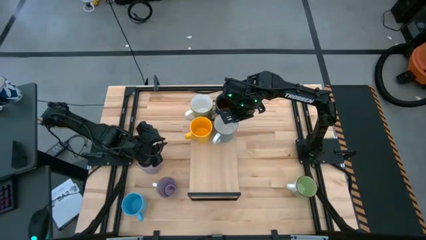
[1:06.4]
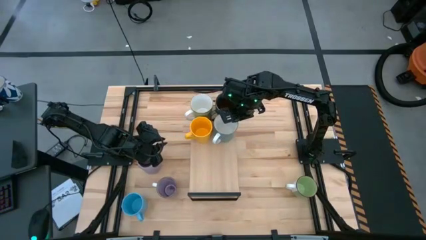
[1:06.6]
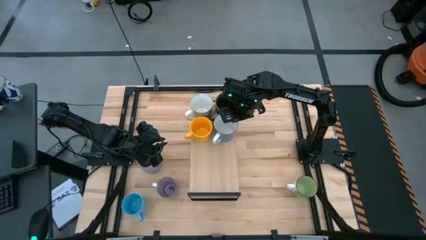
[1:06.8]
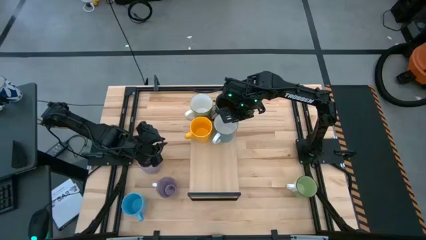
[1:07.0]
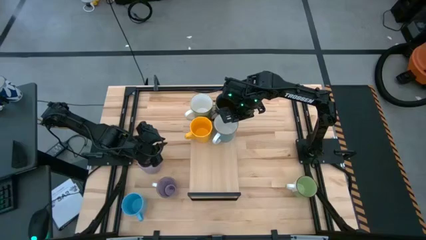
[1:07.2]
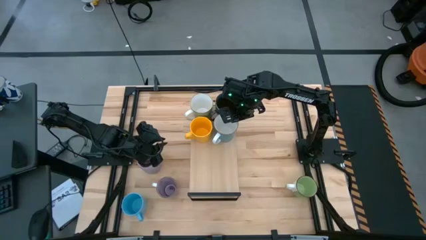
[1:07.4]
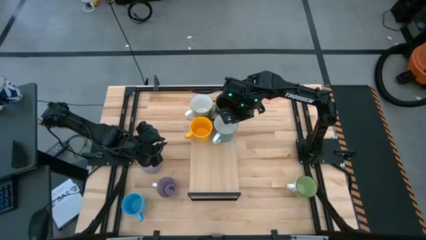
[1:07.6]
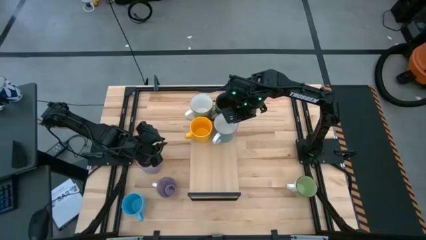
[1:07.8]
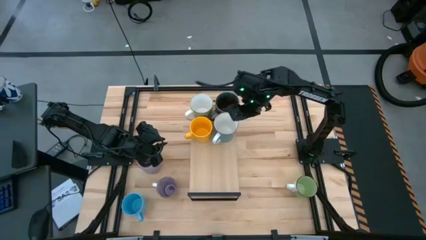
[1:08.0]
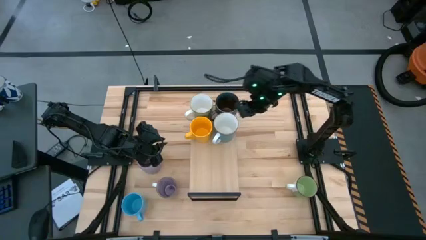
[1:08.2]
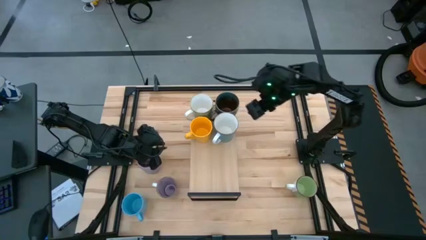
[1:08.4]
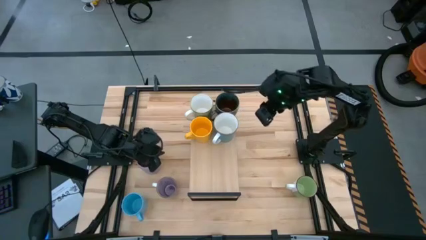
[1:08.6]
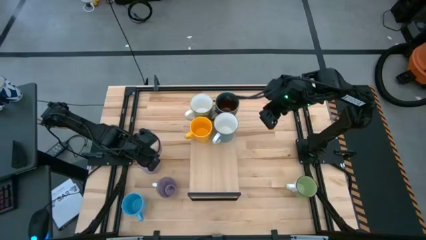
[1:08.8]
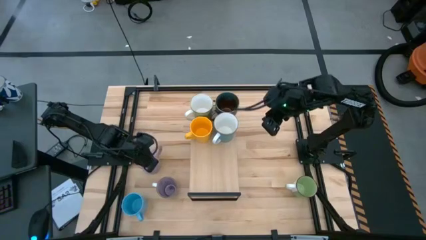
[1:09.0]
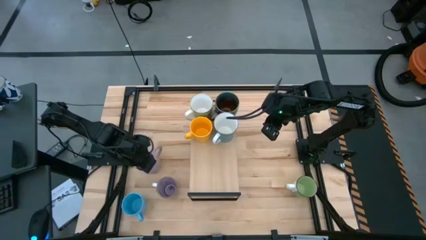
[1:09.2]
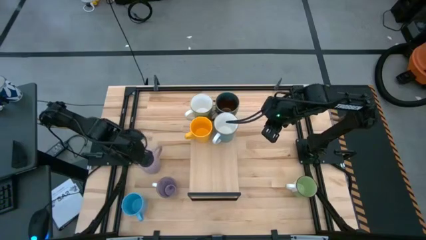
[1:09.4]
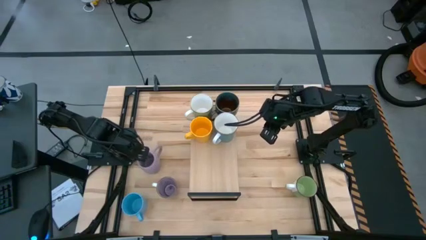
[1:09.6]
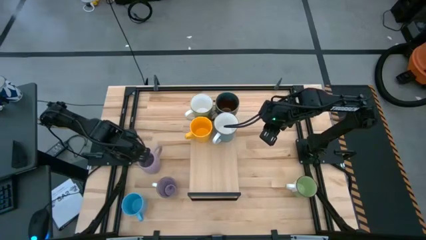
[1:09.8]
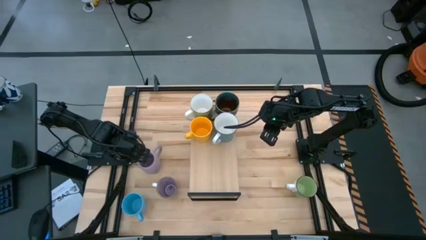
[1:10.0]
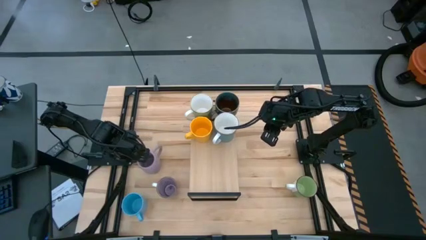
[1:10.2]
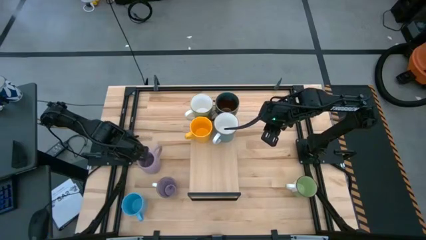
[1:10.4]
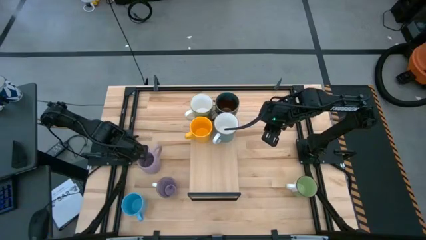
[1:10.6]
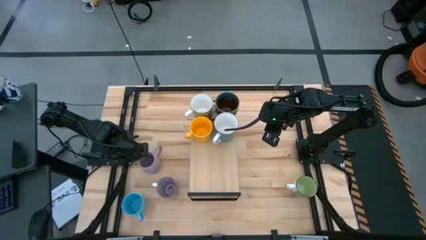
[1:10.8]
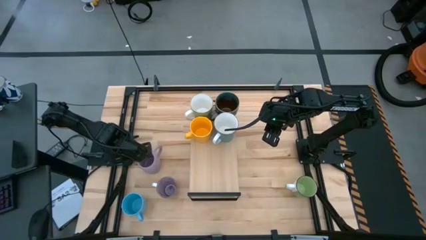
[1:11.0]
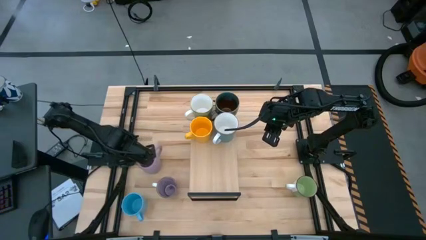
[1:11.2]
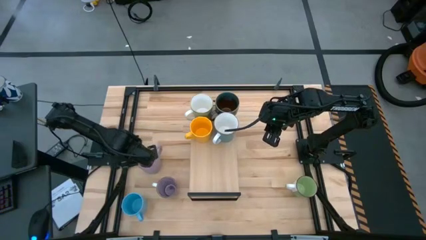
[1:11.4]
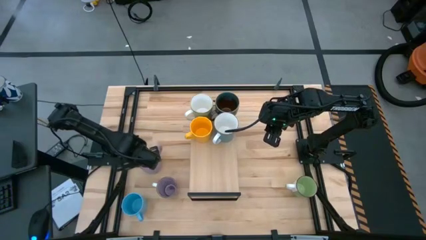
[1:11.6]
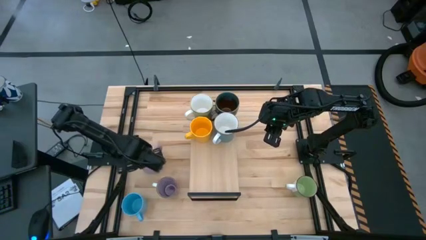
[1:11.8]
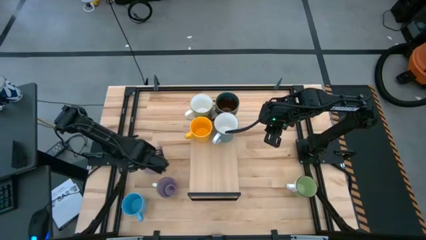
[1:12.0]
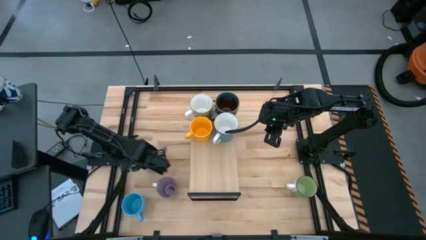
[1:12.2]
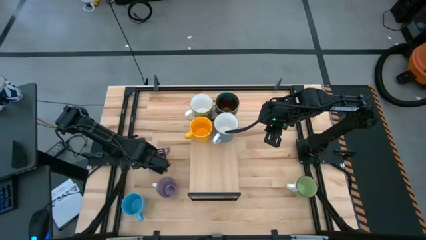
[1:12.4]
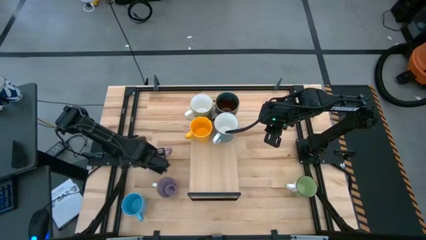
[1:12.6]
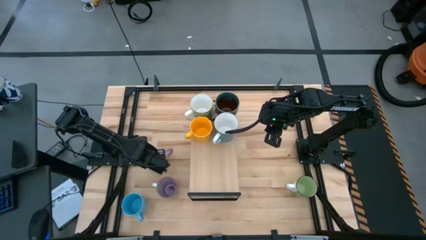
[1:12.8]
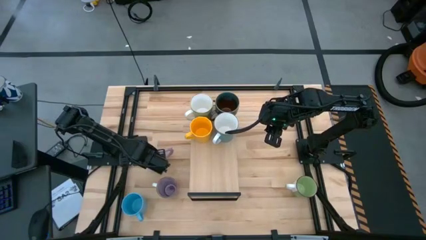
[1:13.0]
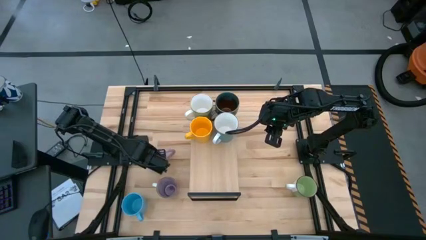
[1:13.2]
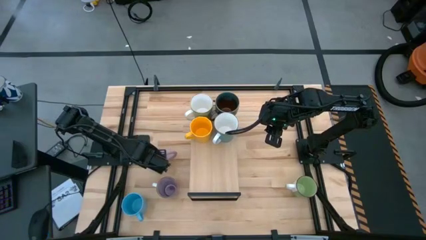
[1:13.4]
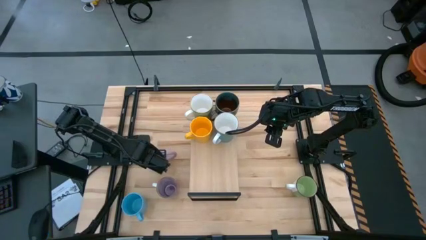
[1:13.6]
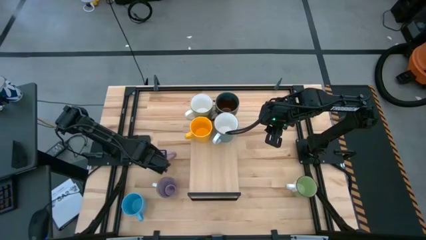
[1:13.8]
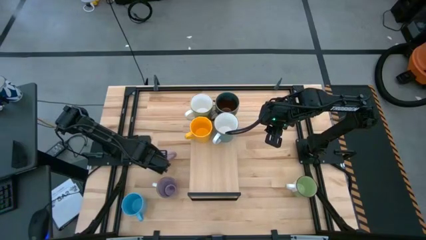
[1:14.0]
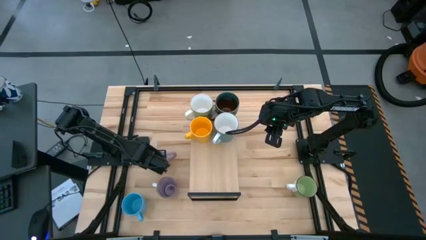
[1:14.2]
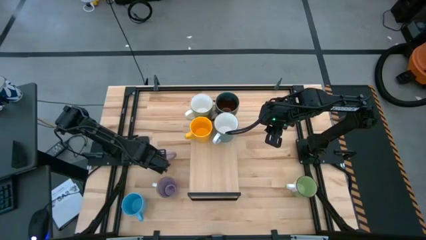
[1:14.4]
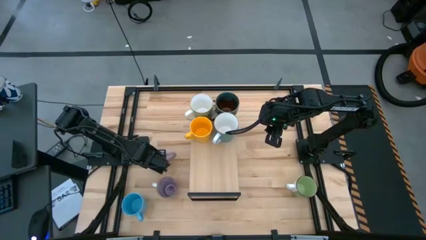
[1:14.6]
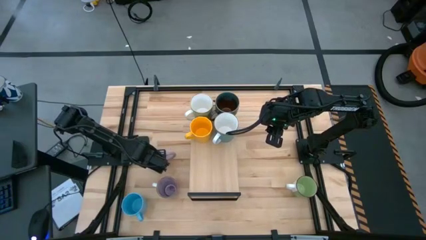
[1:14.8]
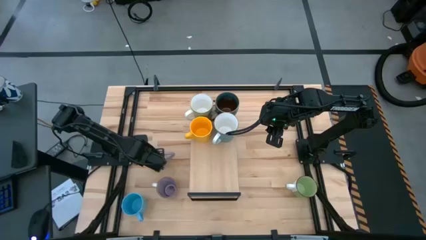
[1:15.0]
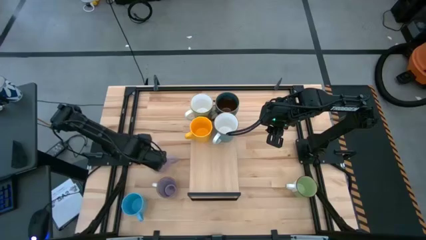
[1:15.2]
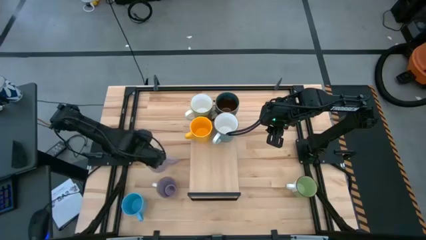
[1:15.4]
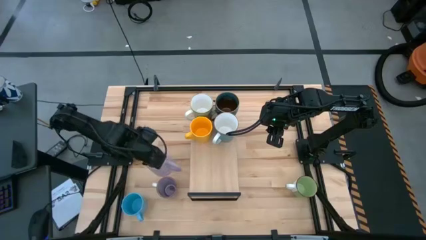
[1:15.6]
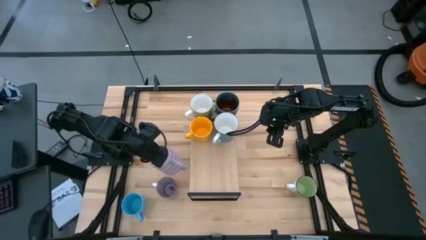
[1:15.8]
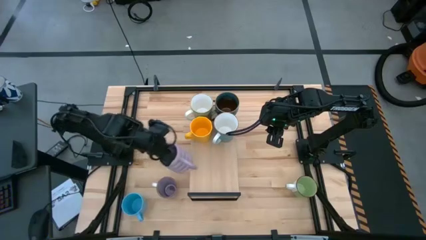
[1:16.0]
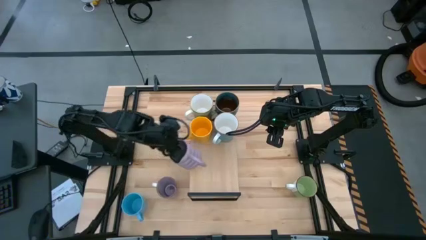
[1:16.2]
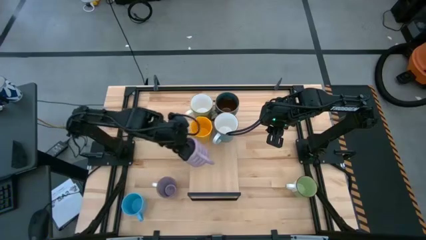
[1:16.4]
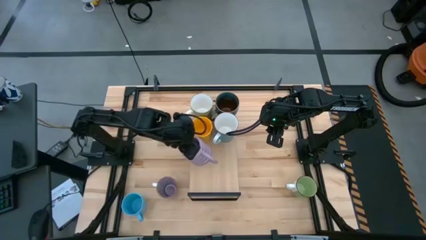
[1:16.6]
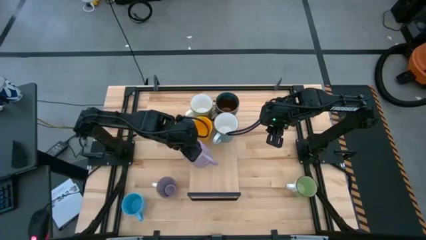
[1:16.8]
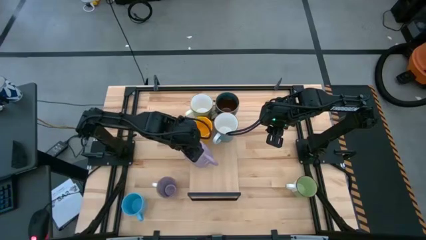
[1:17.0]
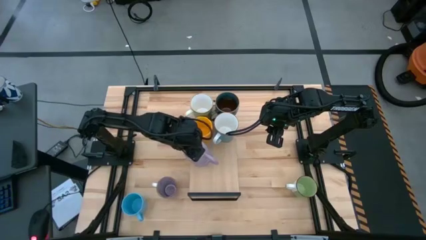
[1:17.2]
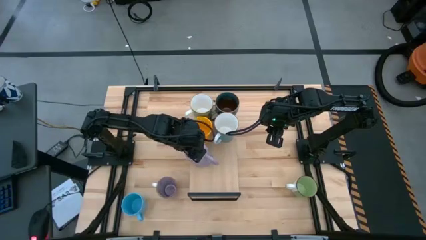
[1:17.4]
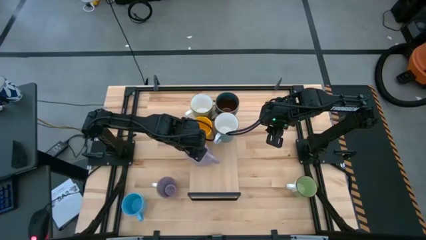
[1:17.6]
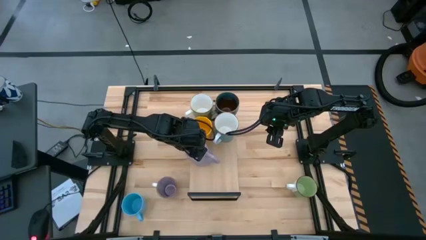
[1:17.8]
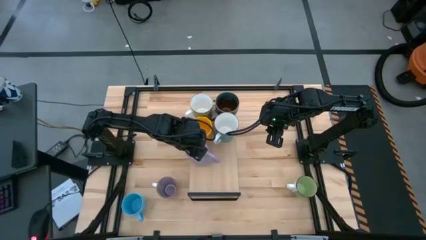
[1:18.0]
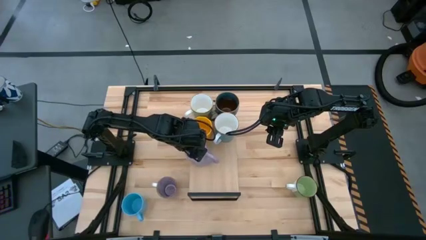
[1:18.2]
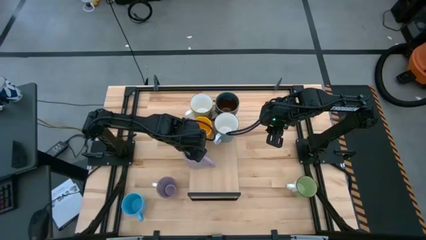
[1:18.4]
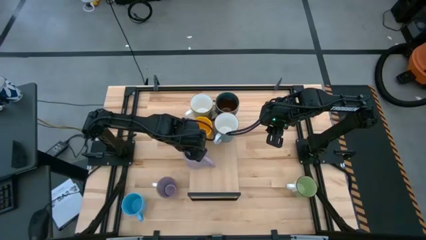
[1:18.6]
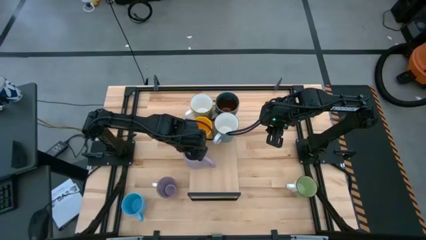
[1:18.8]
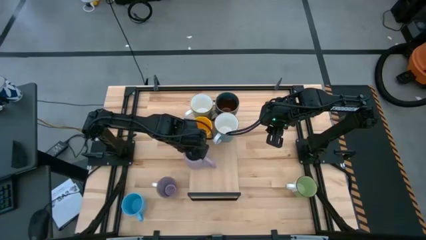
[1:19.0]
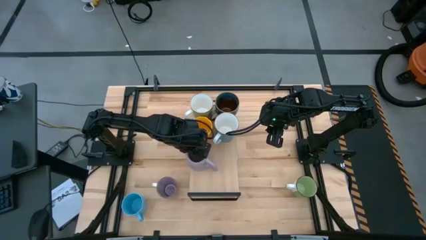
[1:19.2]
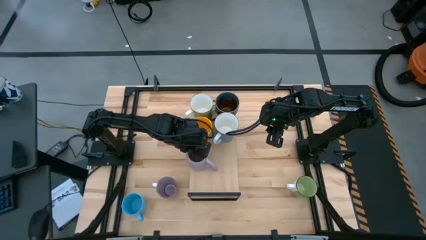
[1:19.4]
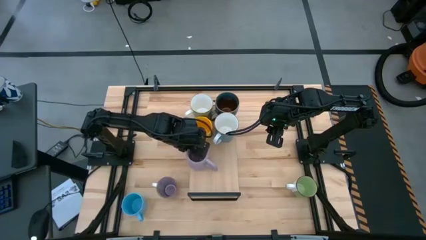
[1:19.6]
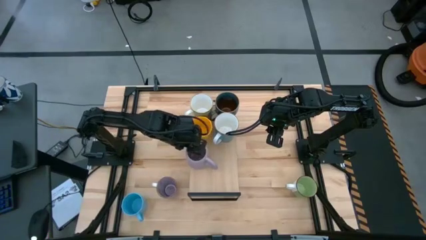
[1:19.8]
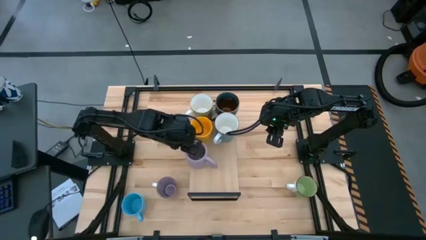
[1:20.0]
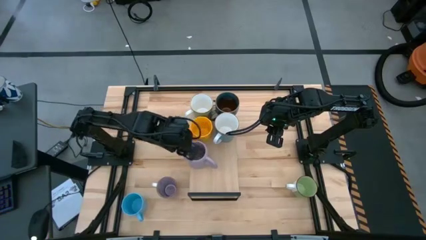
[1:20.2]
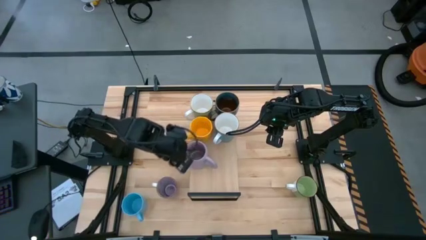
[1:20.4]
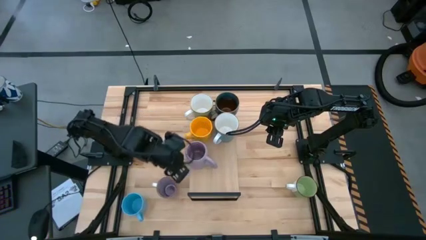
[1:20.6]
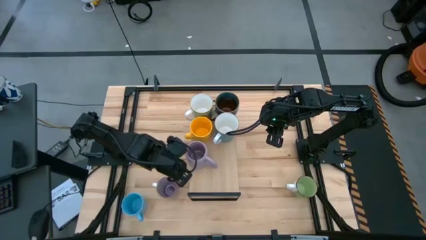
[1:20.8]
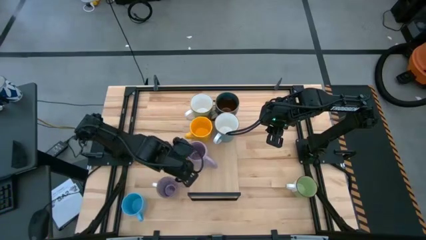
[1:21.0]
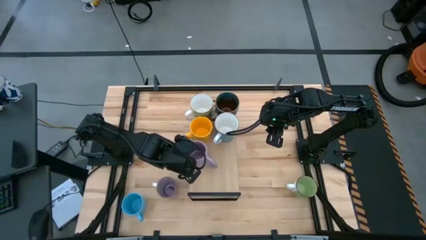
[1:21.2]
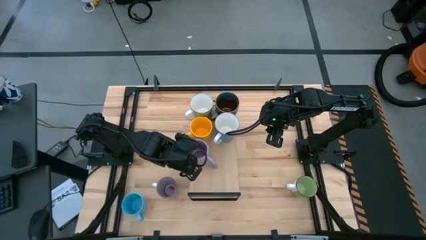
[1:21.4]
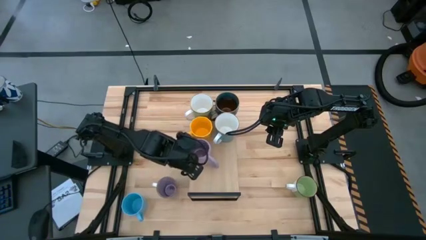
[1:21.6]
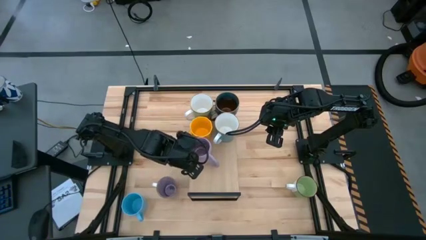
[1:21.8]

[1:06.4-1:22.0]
Task: Place coffee mugs
Put the top purple mug on the shelf
